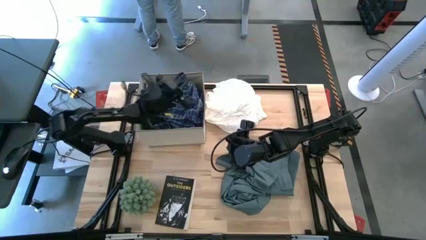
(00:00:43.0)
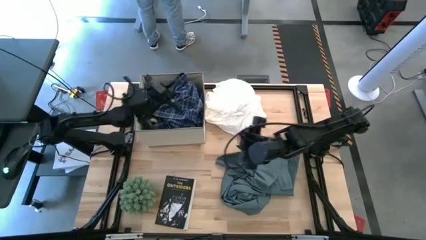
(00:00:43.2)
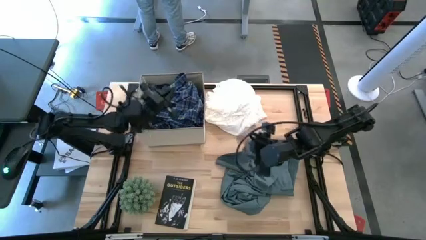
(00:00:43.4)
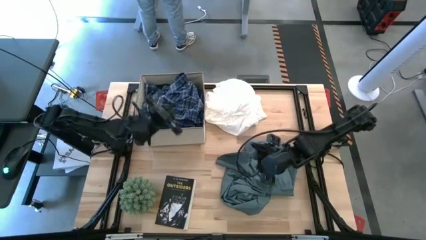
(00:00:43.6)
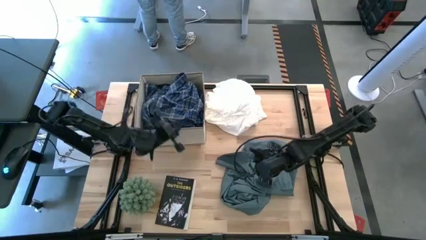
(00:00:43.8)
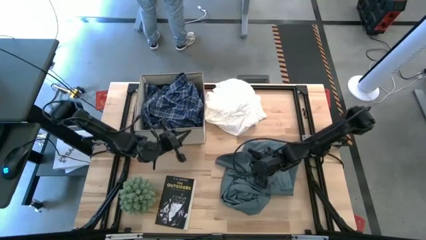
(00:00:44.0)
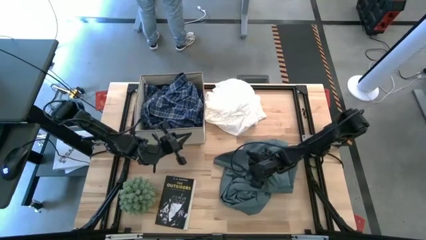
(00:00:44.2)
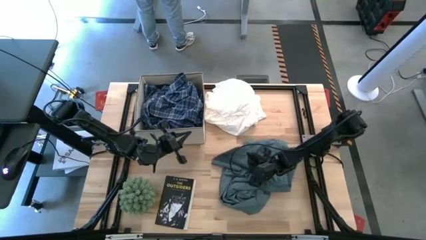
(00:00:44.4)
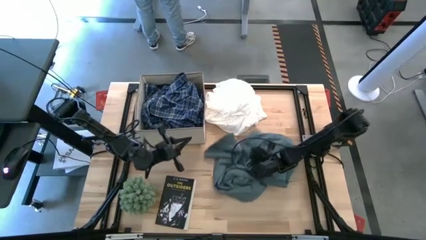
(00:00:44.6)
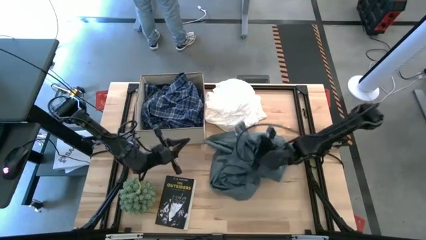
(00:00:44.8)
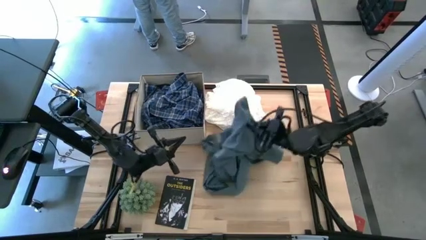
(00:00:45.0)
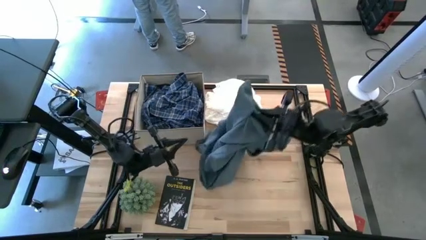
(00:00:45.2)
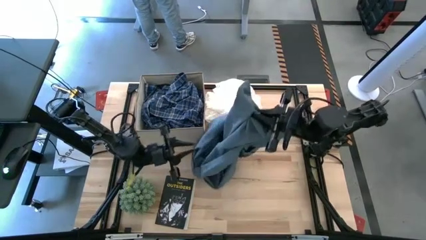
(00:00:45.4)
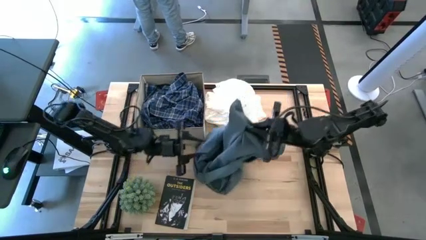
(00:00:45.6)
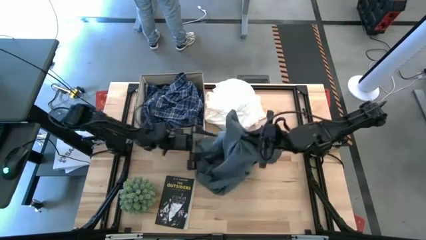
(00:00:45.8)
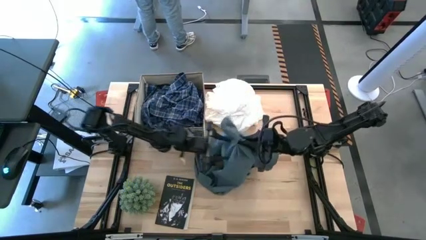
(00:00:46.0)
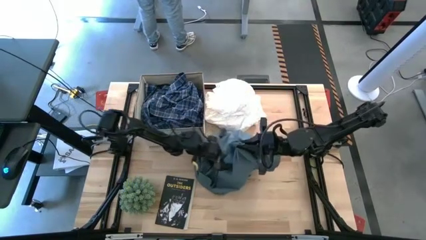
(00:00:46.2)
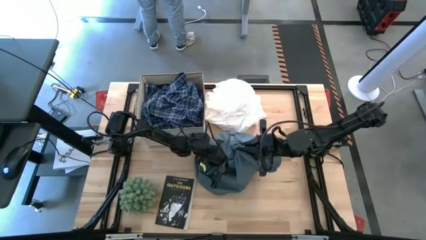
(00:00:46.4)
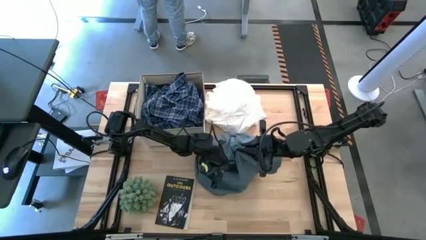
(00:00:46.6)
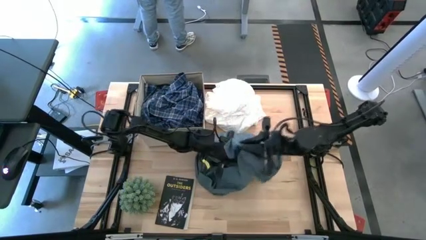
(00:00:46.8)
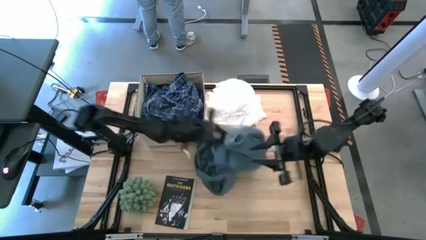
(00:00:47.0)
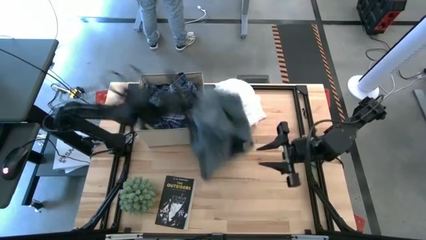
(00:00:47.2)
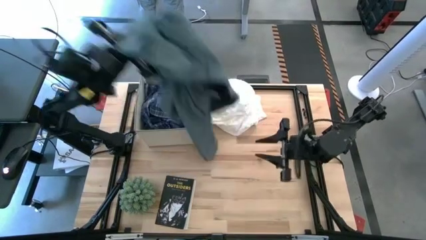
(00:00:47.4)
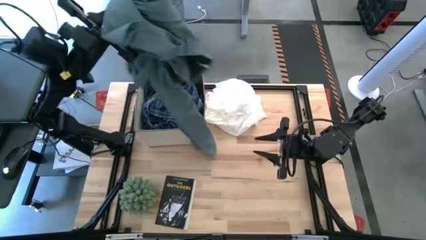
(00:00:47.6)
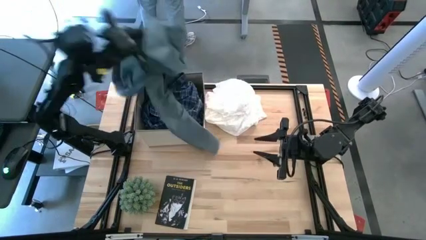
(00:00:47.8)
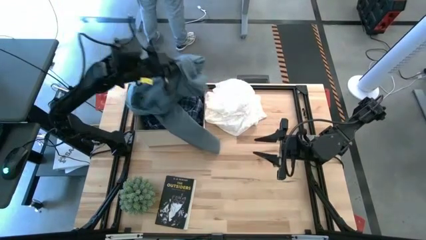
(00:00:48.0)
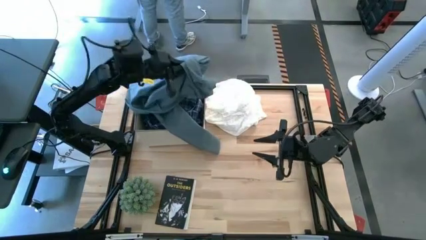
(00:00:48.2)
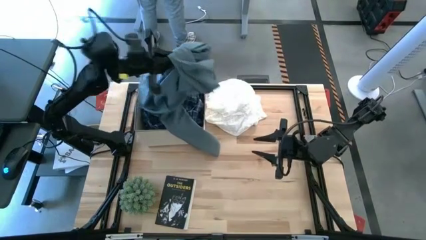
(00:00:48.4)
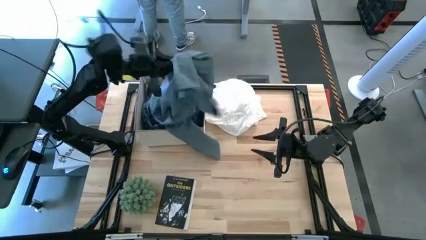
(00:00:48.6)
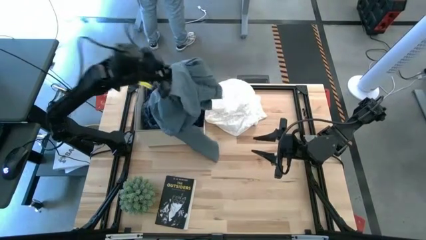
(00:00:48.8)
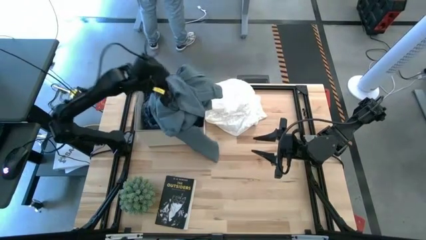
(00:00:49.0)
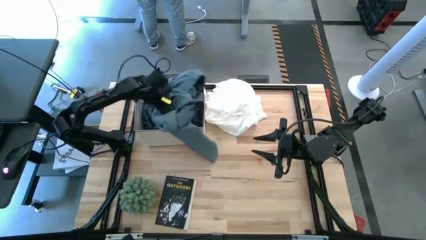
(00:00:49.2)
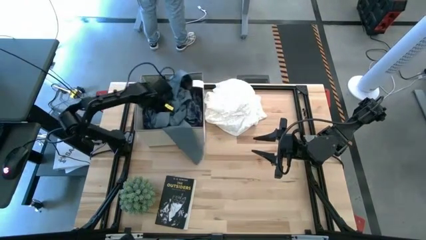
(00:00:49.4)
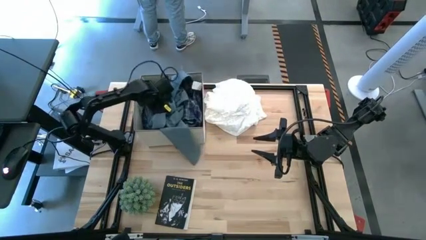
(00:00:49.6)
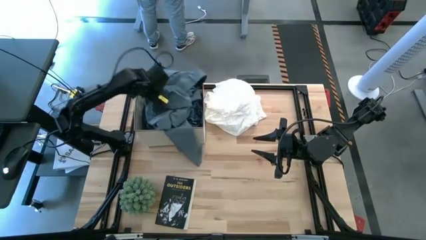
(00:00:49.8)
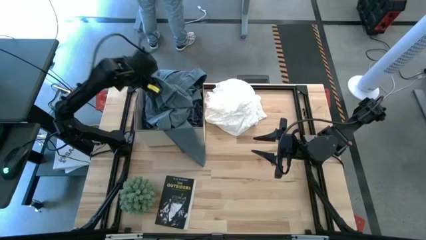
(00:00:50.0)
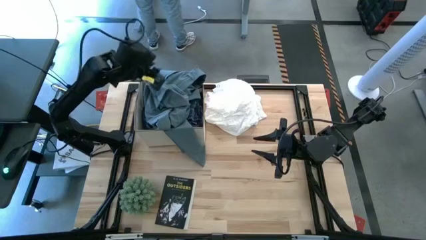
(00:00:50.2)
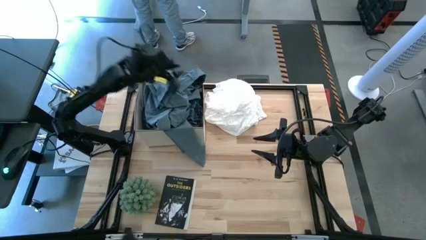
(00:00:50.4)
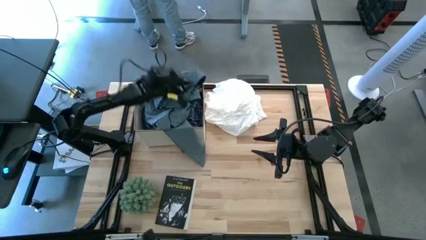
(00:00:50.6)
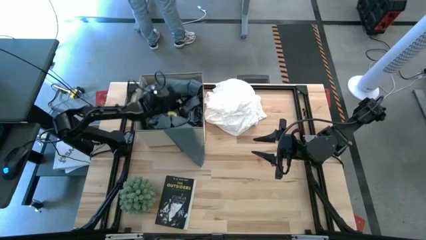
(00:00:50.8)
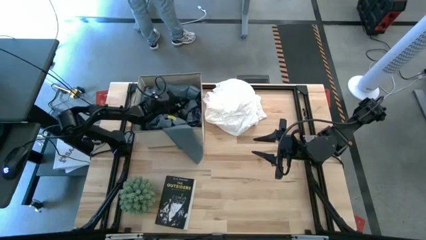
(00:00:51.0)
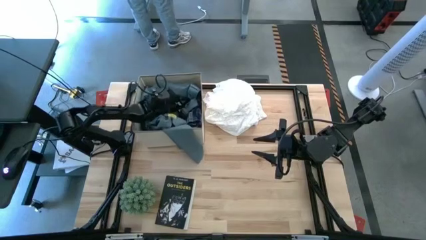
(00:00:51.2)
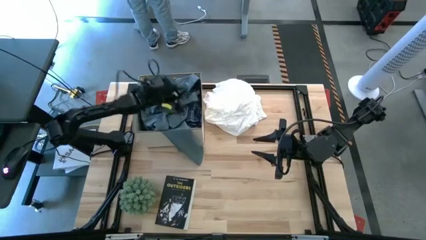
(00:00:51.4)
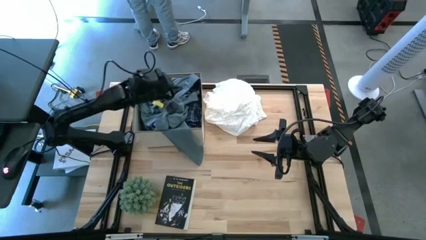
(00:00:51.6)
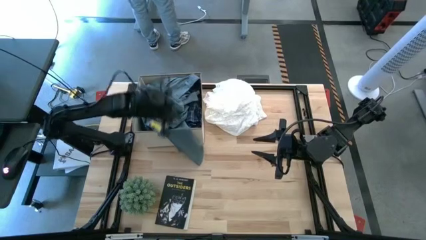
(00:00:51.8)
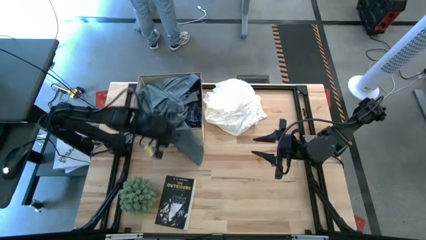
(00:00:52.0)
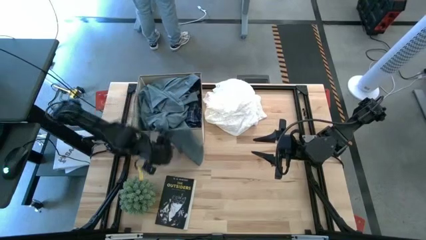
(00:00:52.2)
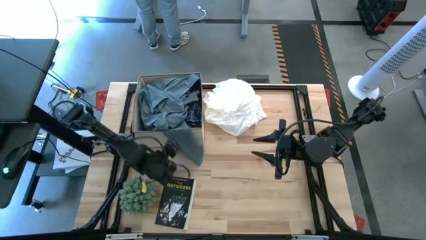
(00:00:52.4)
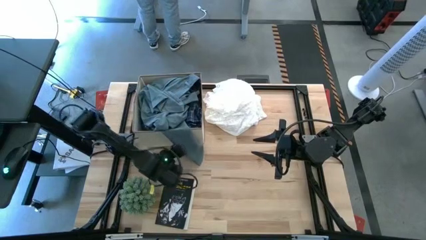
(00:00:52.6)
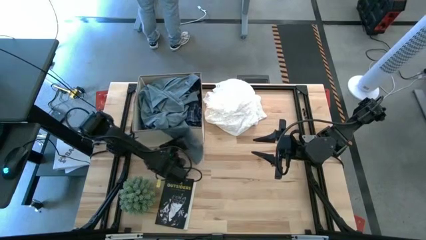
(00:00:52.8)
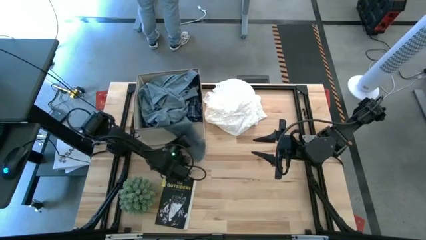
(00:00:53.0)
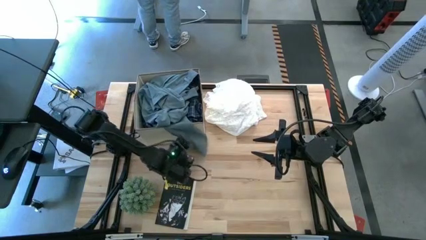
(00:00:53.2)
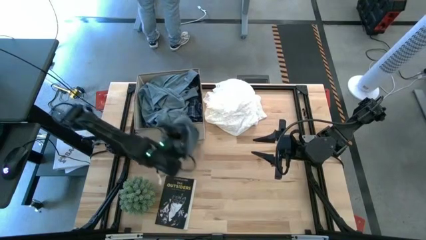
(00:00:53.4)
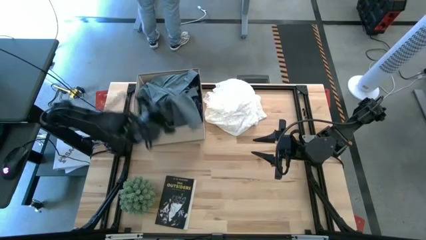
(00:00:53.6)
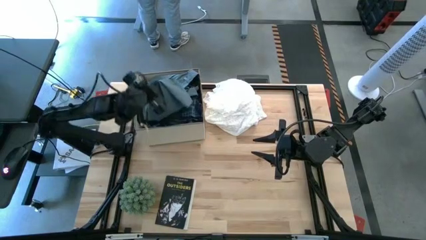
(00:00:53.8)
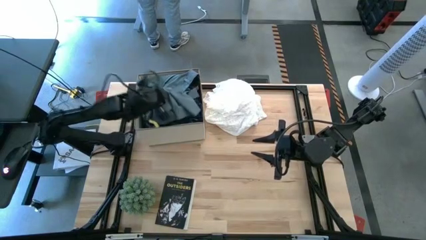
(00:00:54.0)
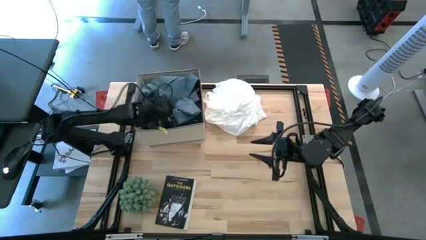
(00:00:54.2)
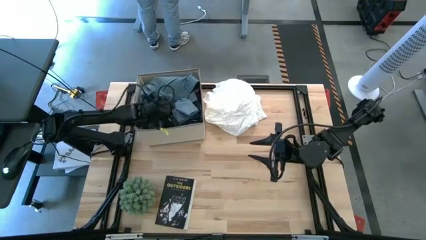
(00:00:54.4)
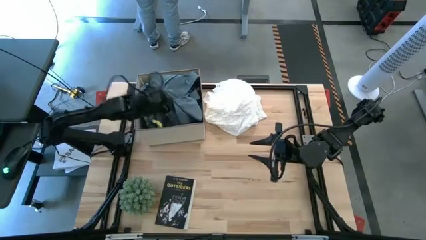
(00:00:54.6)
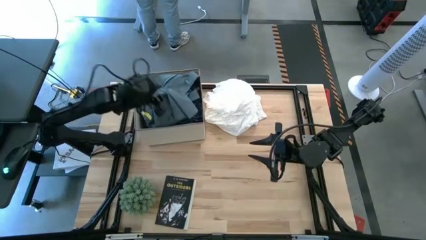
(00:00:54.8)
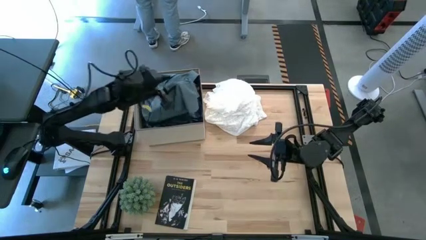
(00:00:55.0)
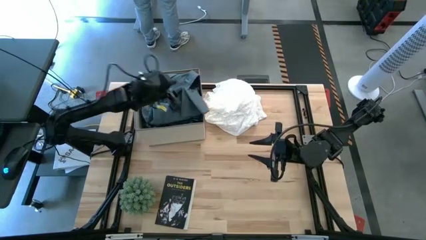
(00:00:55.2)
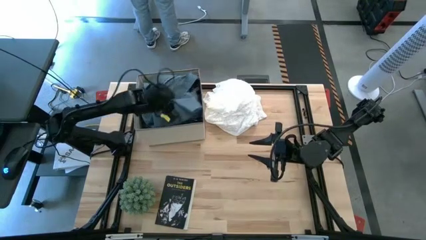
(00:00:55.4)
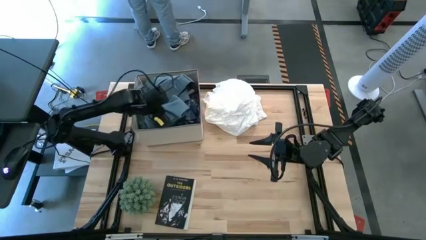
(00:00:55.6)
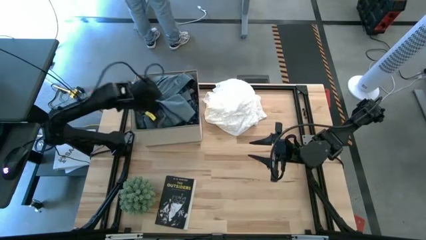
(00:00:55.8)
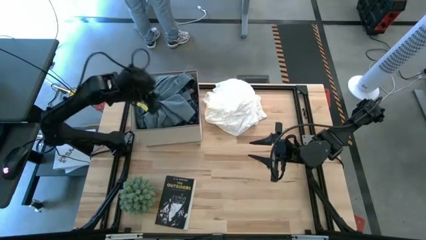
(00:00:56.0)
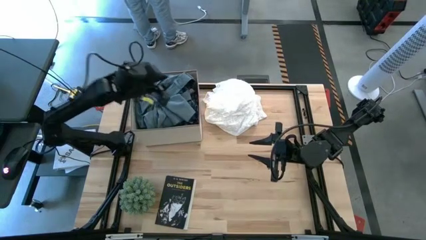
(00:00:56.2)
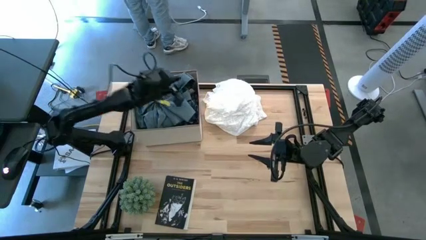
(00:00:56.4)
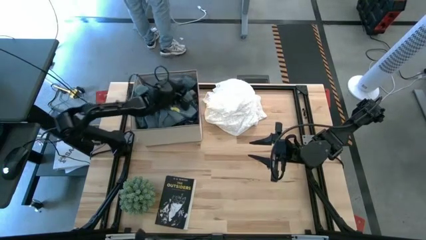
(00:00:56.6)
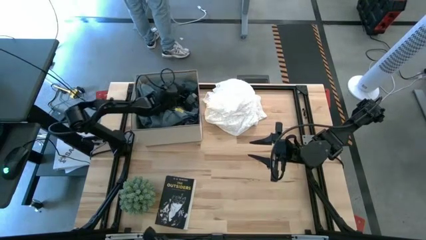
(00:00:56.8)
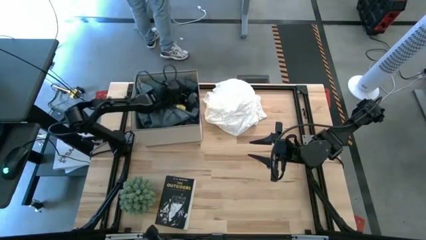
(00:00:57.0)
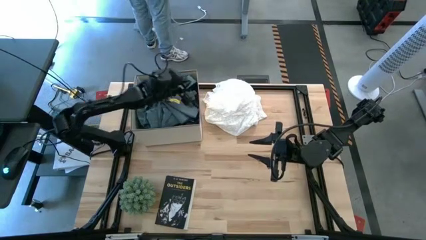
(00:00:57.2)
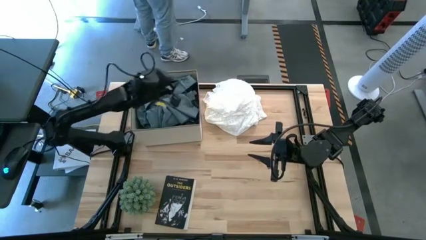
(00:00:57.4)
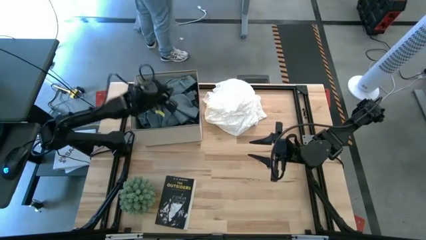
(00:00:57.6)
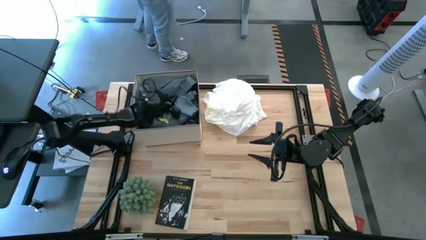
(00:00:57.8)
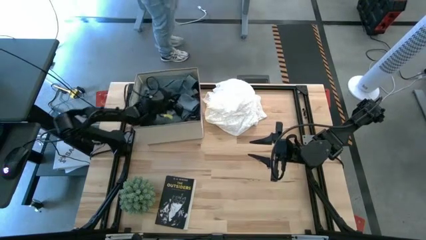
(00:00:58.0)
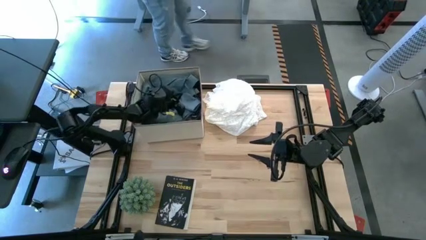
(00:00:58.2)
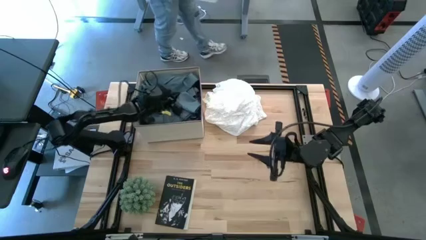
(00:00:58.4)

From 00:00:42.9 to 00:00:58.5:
Task: Sort clothes
Put the blue pants into the laundry organizer

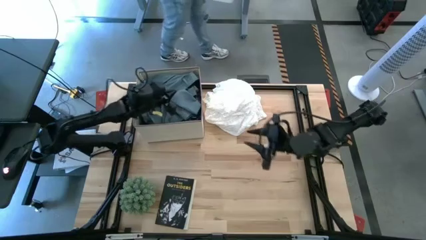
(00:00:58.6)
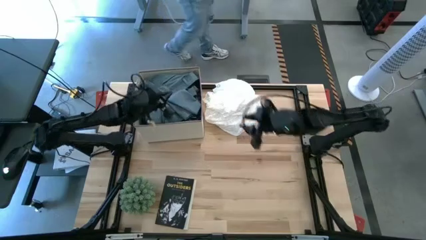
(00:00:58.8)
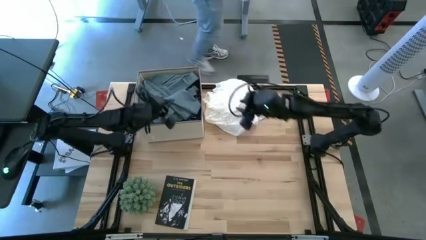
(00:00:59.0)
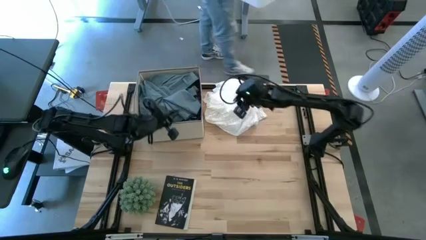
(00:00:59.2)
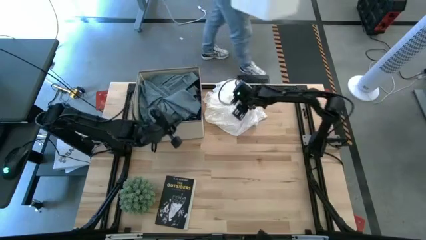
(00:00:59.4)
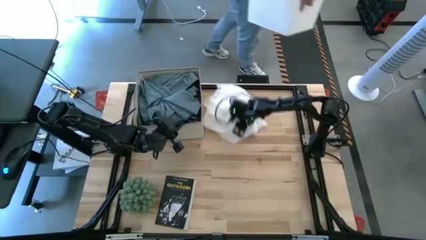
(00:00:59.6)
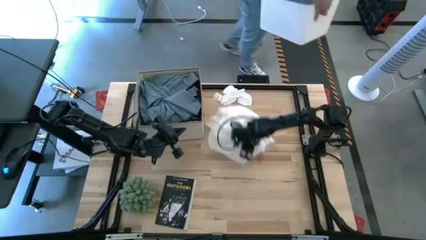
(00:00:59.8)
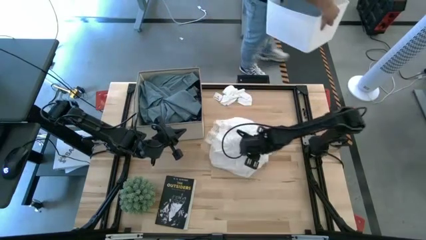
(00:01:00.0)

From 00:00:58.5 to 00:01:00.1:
Move the white dress to the center of the table
